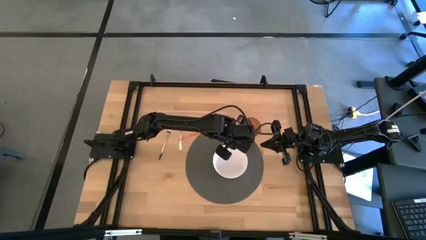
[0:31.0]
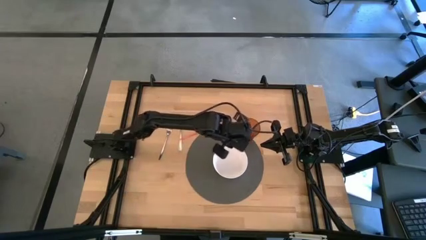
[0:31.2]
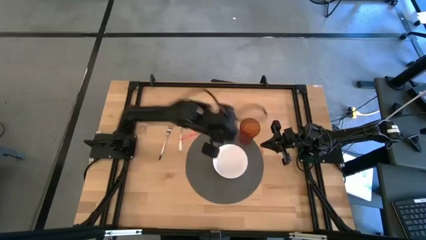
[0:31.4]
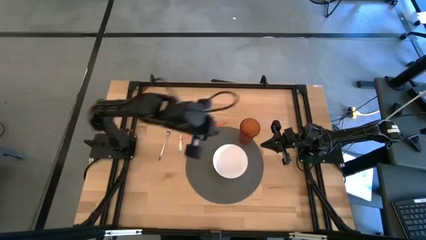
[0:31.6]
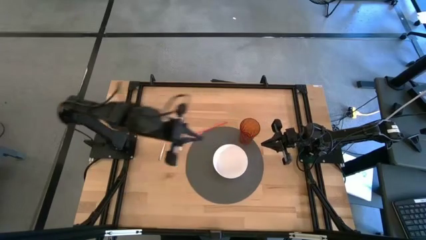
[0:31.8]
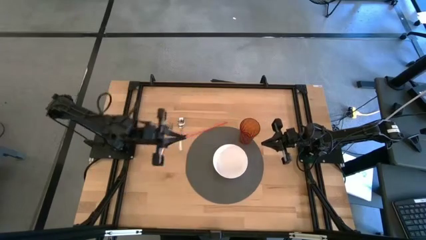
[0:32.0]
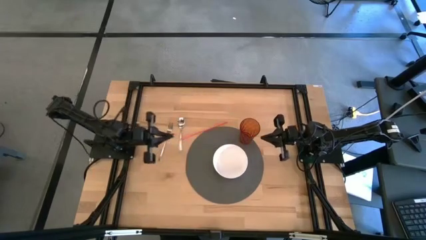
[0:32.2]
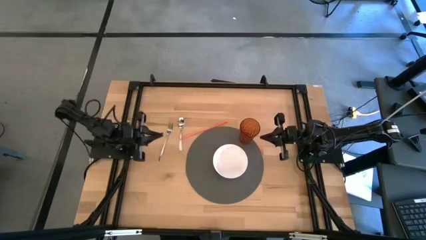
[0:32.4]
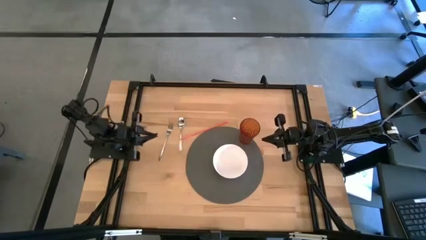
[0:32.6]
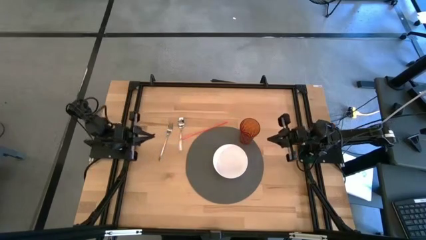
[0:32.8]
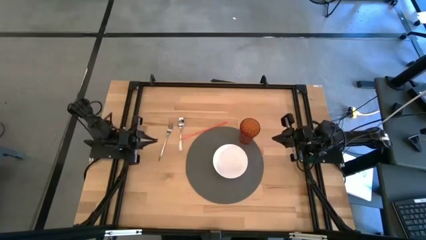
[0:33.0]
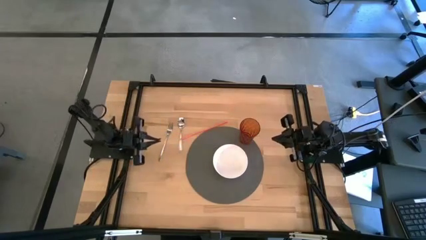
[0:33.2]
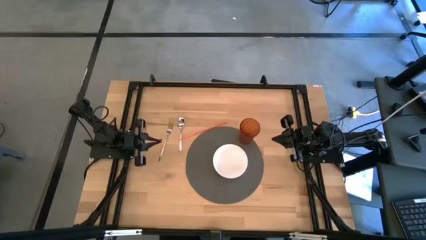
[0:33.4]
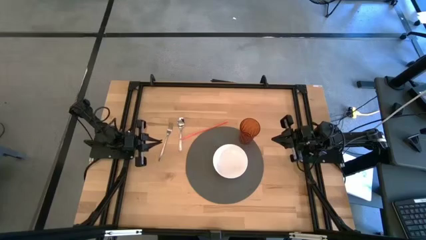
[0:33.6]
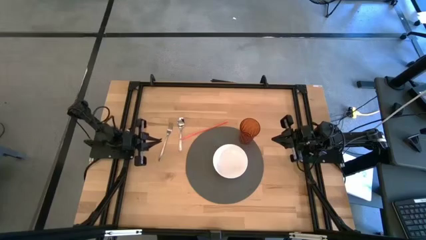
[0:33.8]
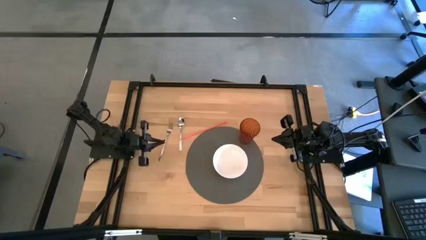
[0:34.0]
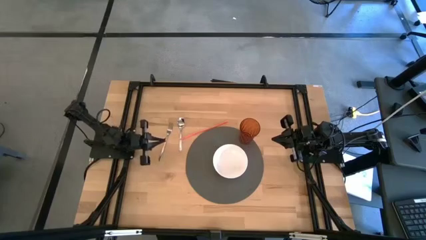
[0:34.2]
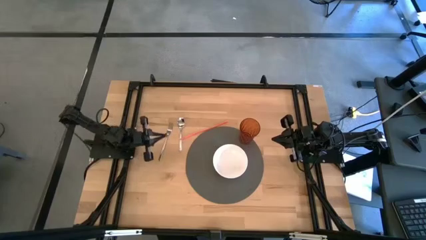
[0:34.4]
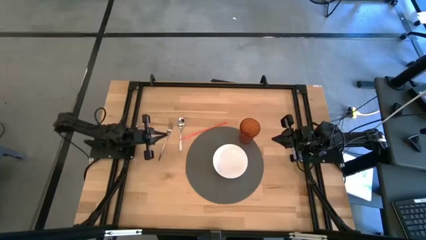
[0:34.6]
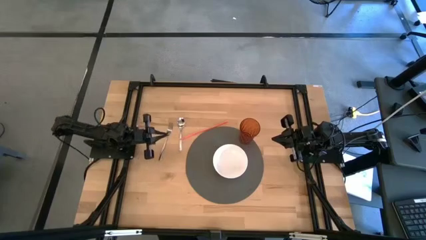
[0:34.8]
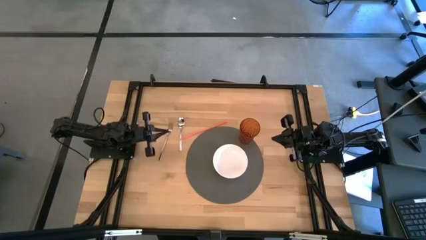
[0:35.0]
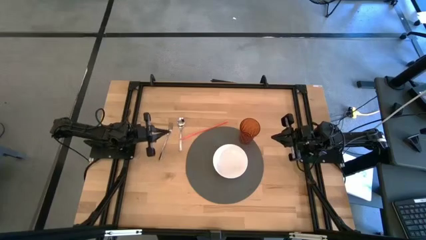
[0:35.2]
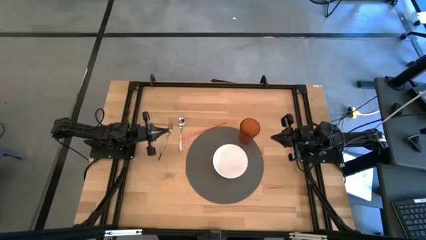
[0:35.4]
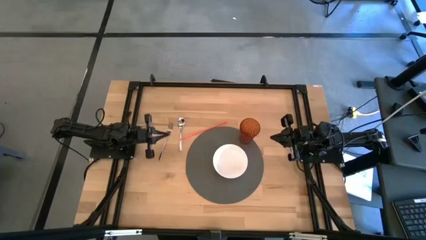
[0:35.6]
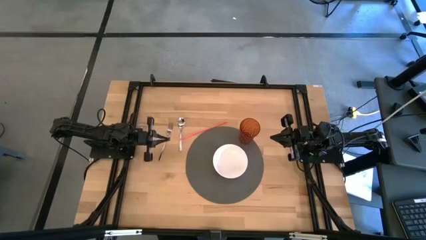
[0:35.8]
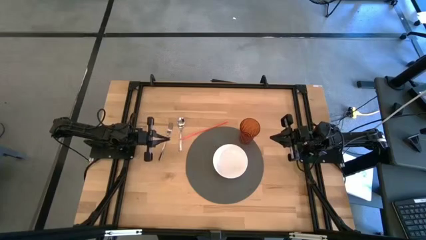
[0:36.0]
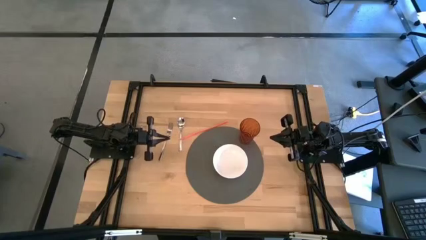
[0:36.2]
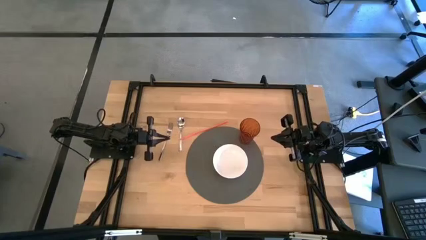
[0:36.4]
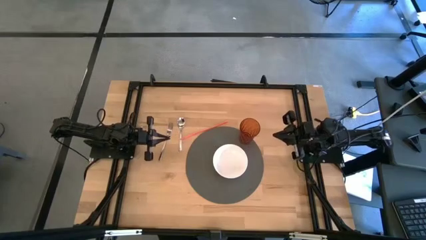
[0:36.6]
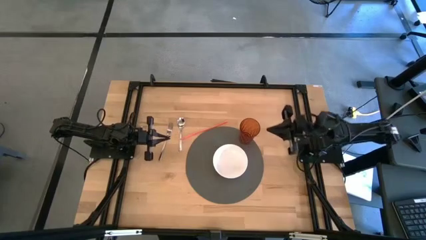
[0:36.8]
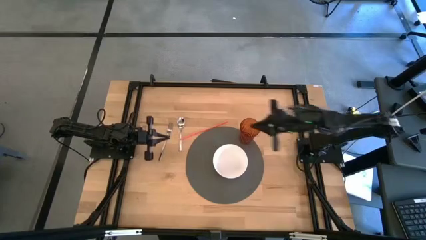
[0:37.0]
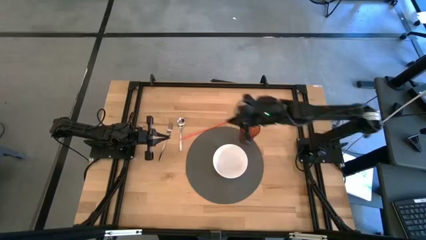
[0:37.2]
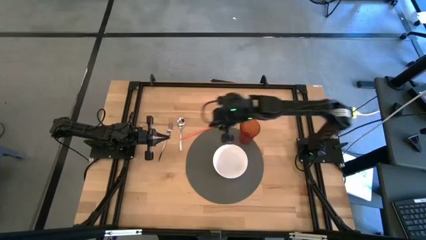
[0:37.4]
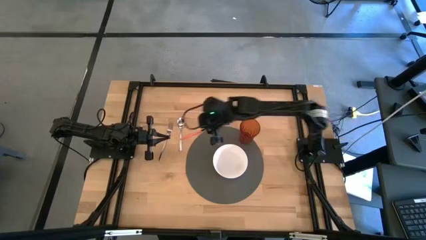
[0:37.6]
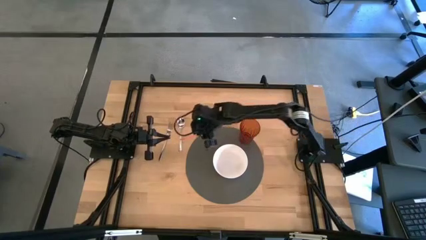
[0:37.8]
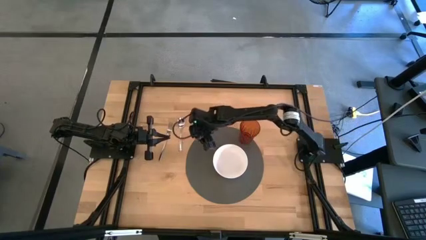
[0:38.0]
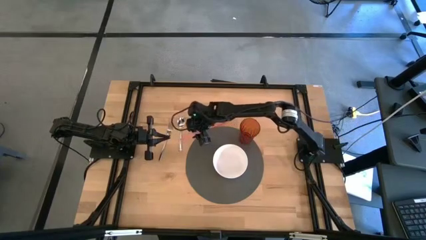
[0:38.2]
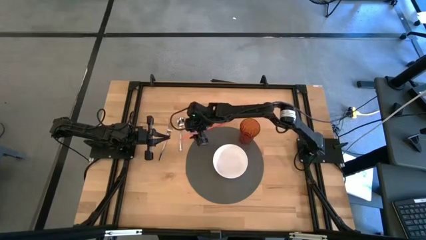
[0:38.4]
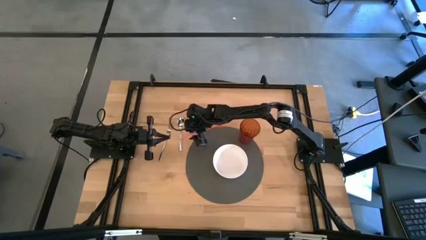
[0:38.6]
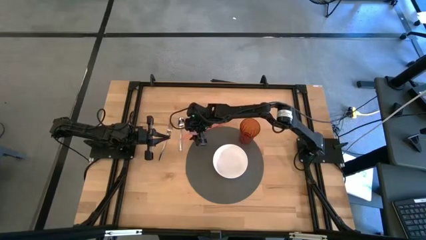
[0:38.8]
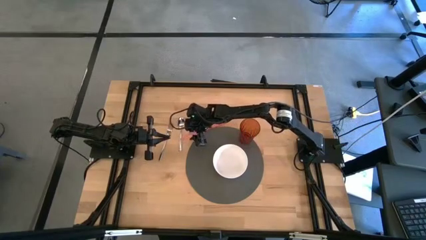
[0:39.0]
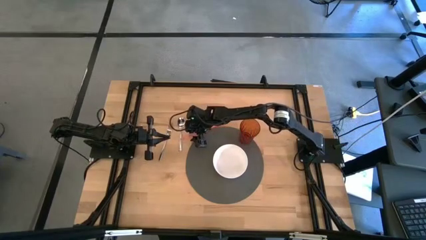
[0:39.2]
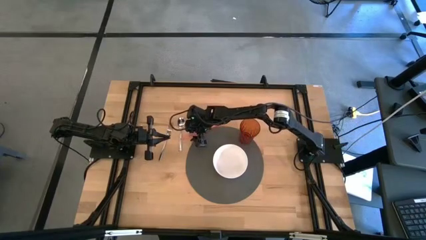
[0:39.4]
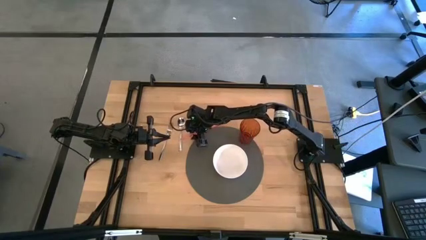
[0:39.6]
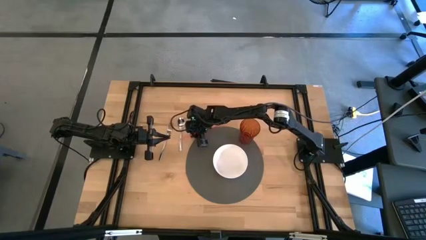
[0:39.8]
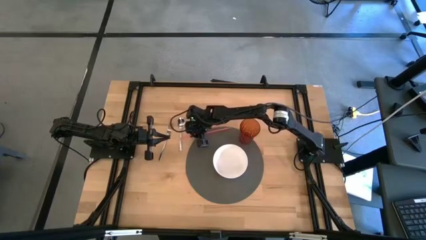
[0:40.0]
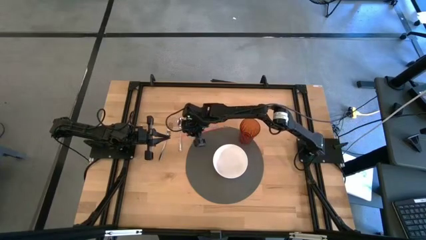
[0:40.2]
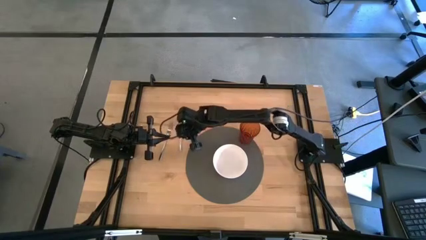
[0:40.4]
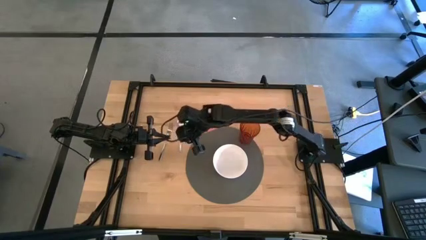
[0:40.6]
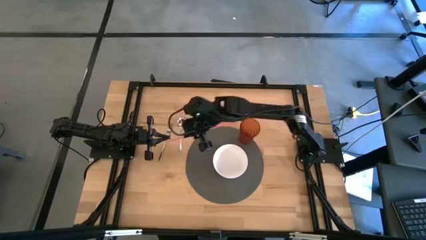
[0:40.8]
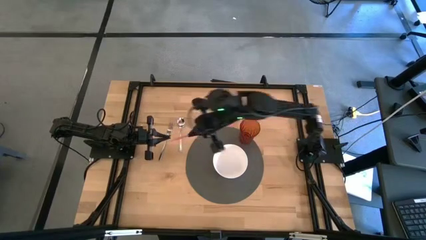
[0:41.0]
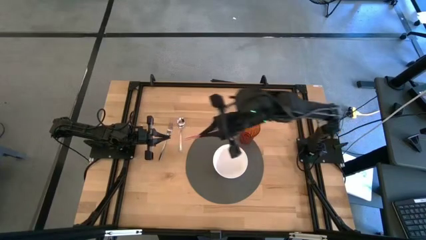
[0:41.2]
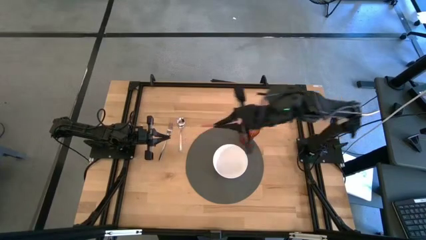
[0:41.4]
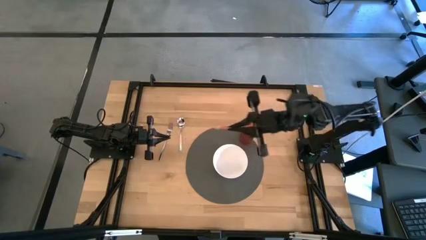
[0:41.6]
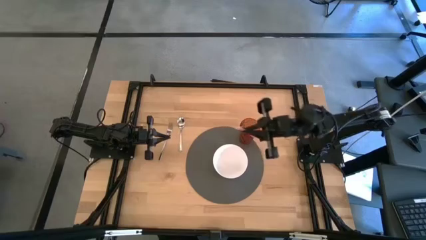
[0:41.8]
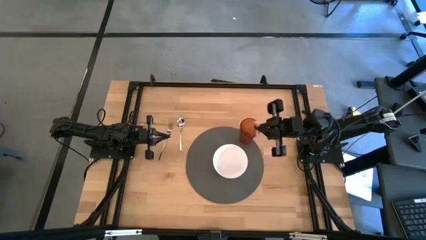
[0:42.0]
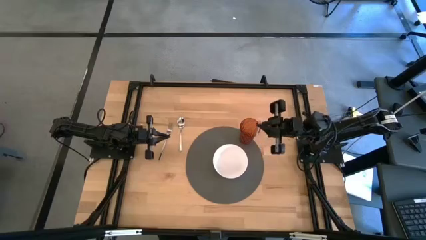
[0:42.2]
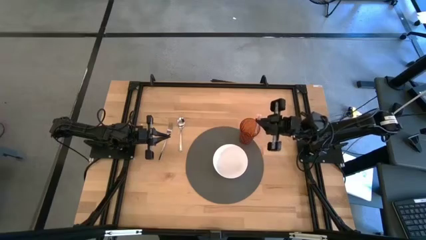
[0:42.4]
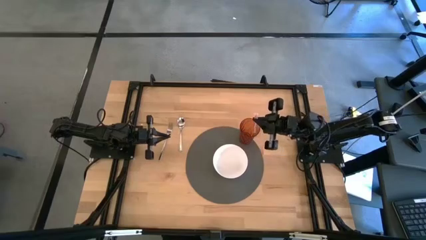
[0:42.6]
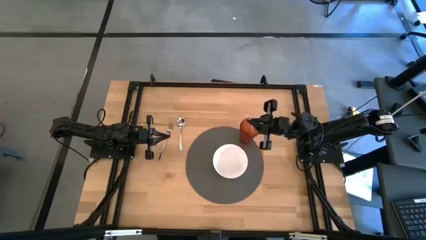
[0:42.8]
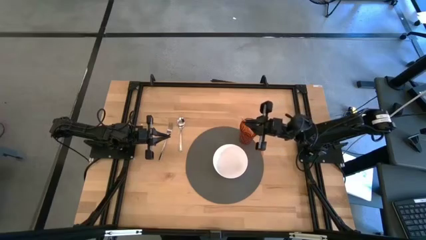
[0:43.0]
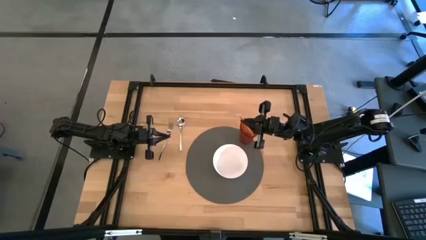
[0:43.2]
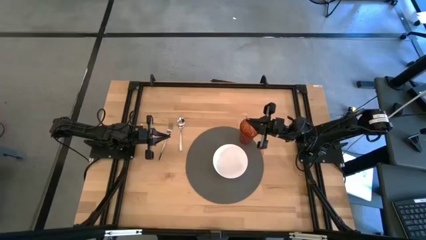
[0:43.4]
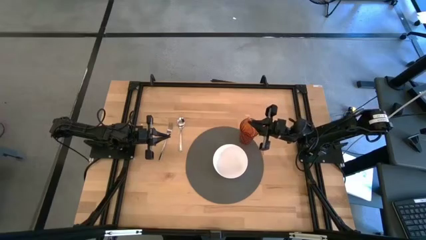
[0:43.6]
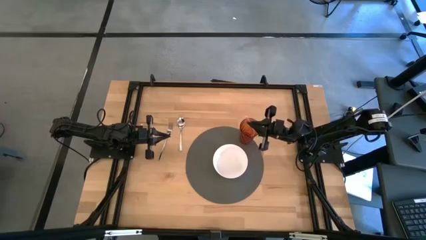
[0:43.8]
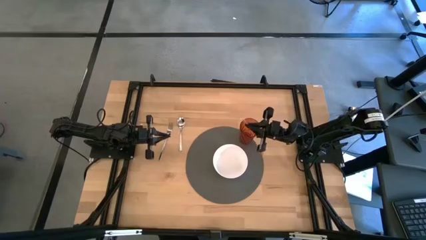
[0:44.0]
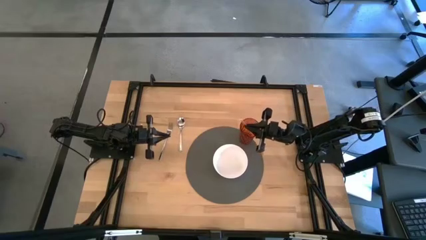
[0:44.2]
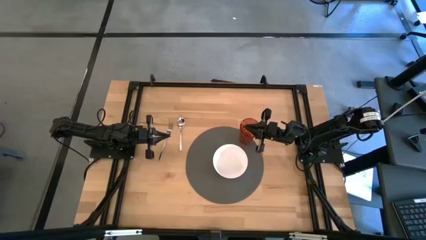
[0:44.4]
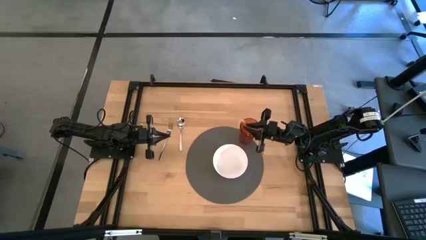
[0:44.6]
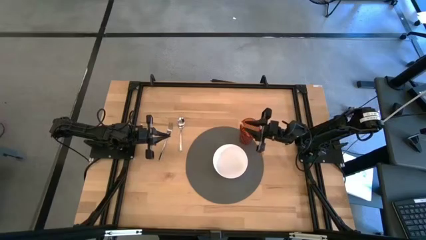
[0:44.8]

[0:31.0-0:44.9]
Task: Pick & Place Utensil
Put the straw into the orange cup on the gray mat
